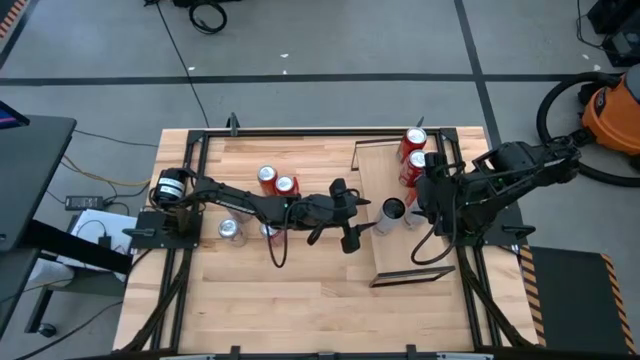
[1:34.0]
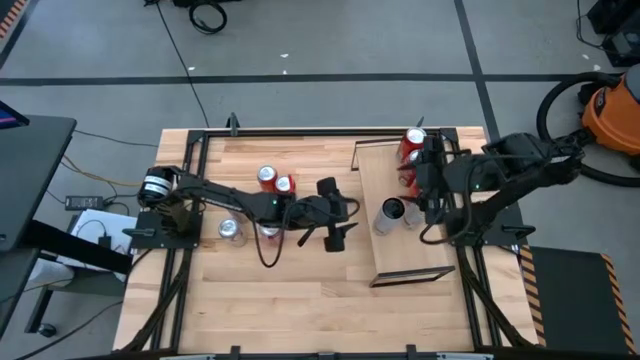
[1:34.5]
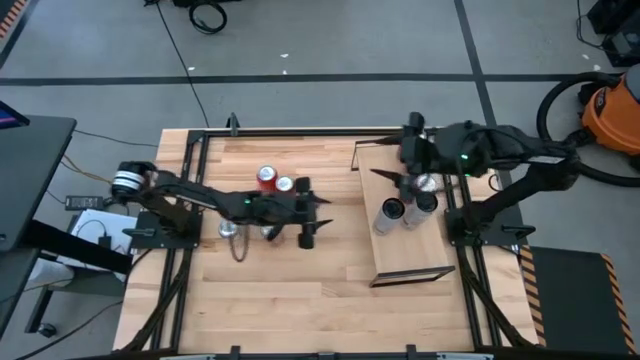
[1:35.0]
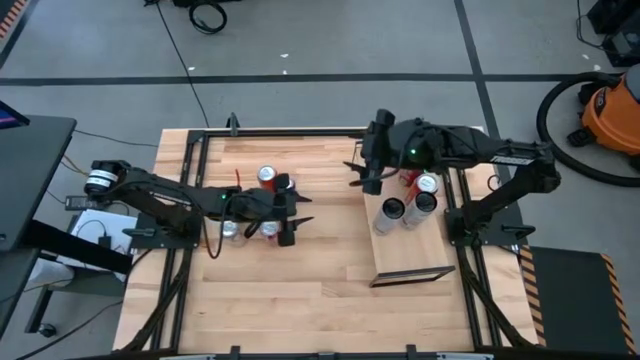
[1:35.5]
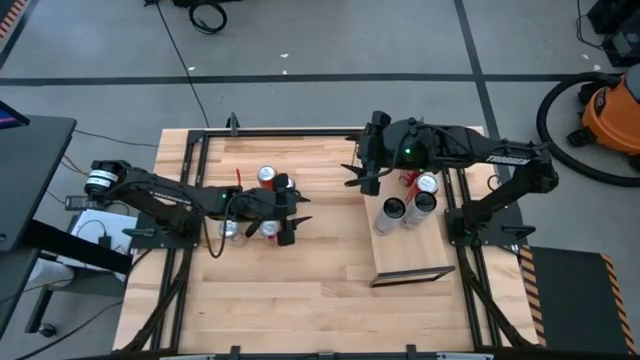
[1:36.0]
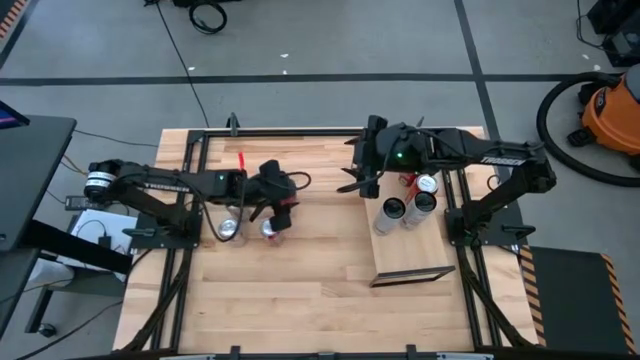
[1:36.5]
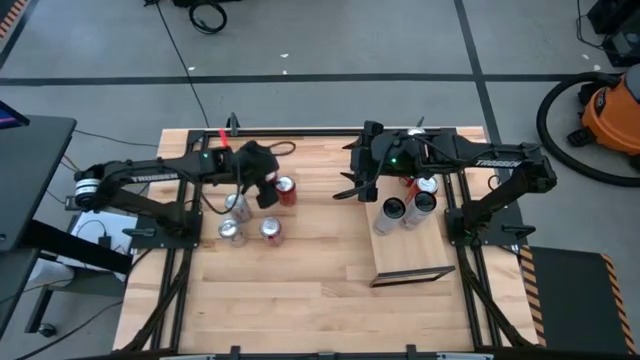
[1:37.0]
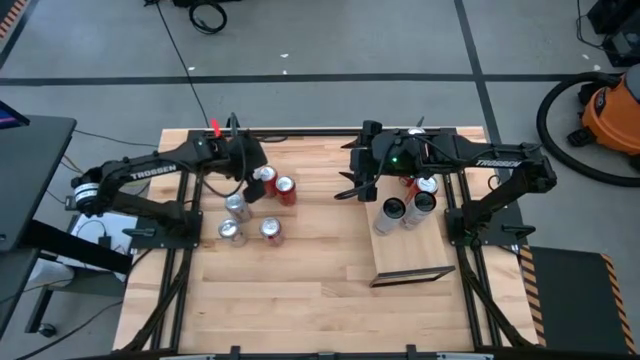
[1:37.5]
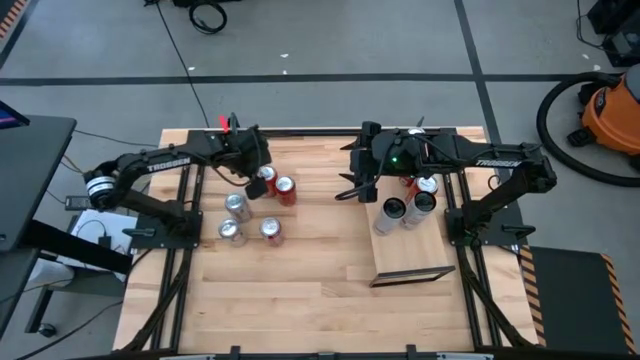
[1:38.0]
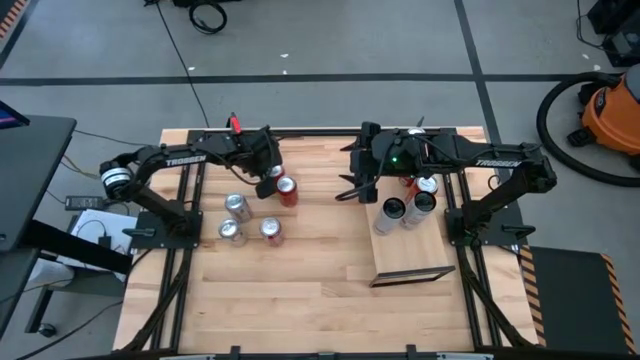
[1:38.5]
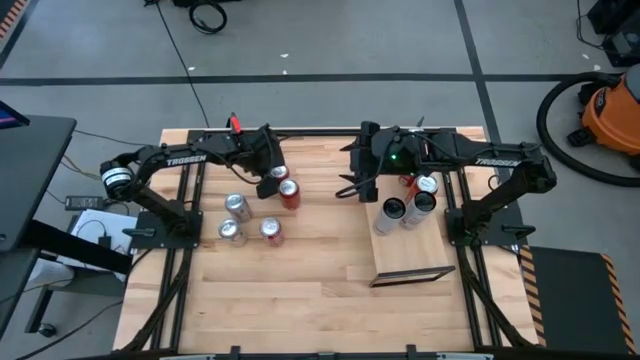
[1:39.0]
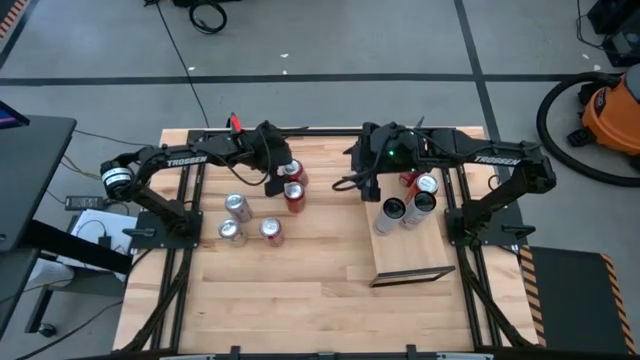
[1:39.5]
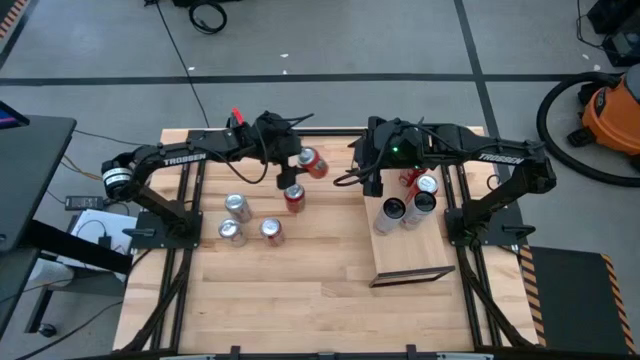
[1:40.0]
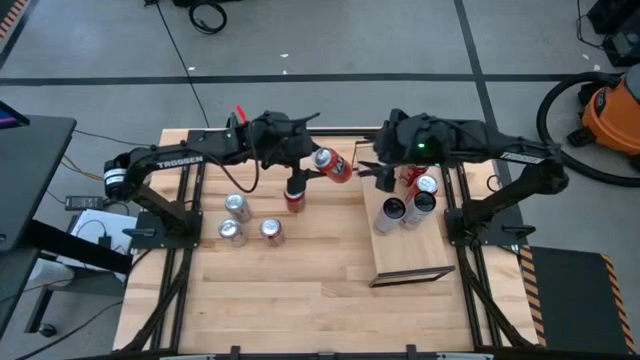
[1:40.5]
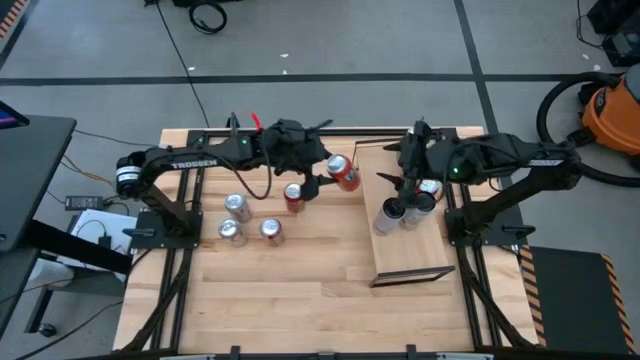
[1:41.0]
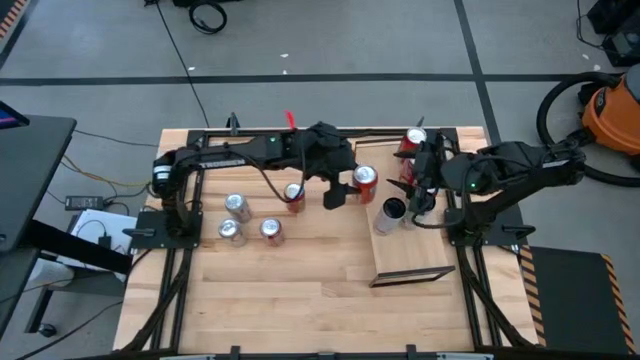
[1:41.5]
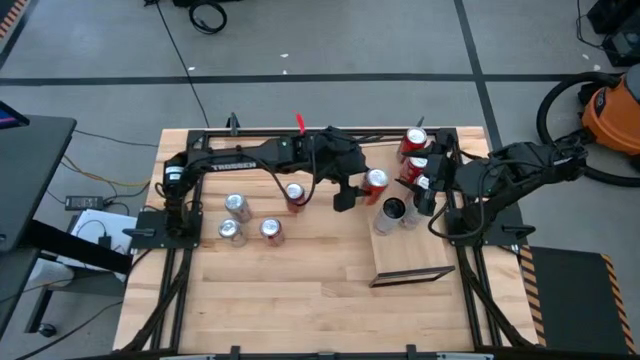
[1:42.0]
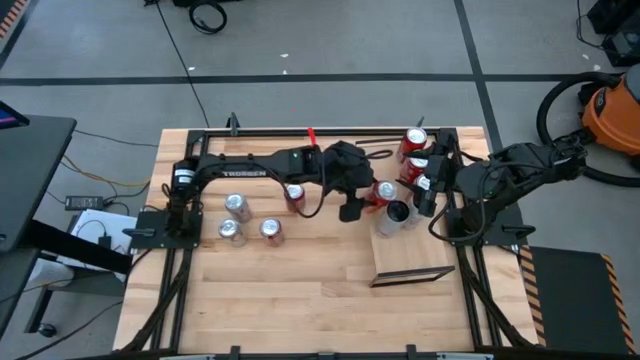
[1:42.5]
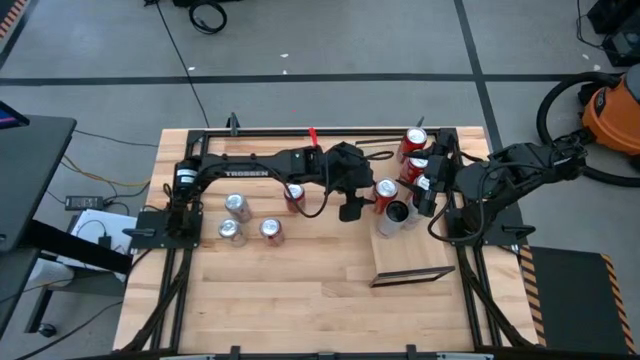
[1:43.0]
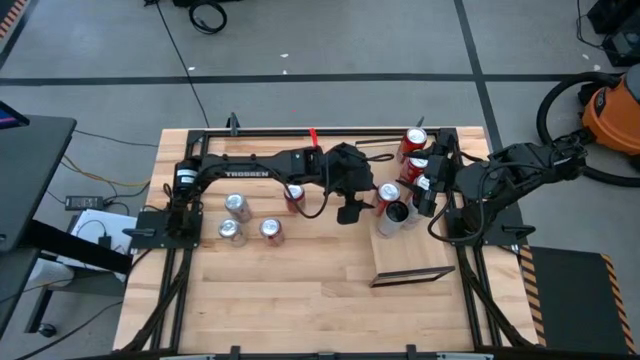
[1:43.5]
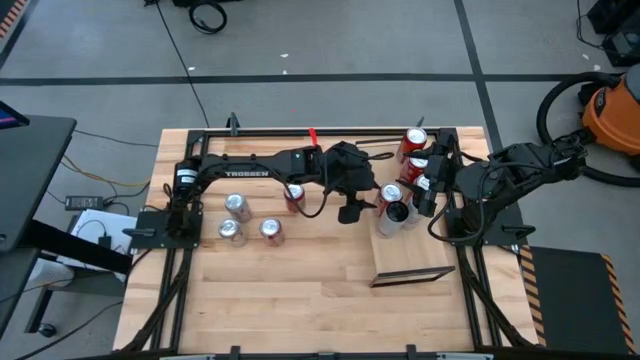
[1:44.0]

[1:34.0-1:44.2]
Task: Place canned beverage on shelf
Put the red soda can on the shelf aligned with the other red soda can

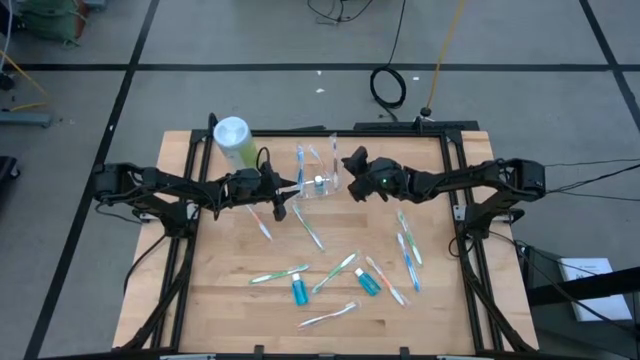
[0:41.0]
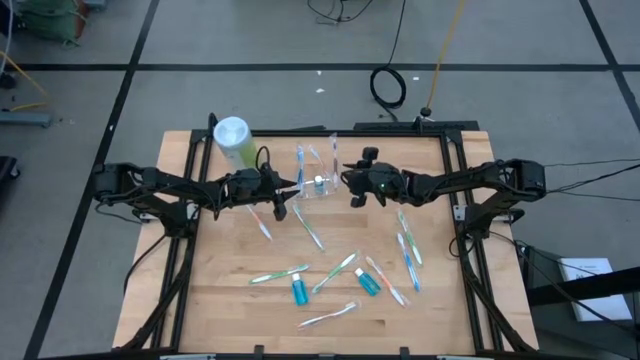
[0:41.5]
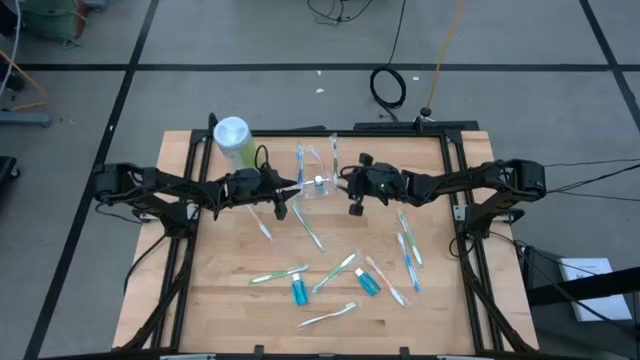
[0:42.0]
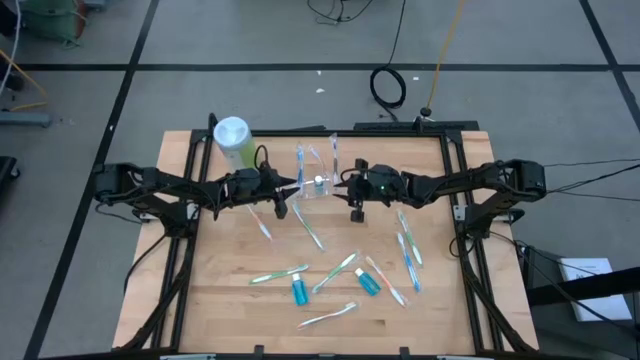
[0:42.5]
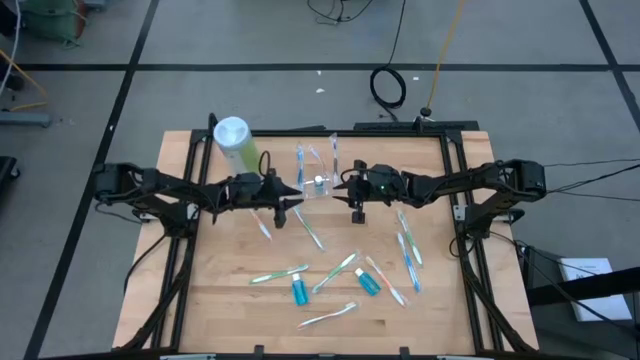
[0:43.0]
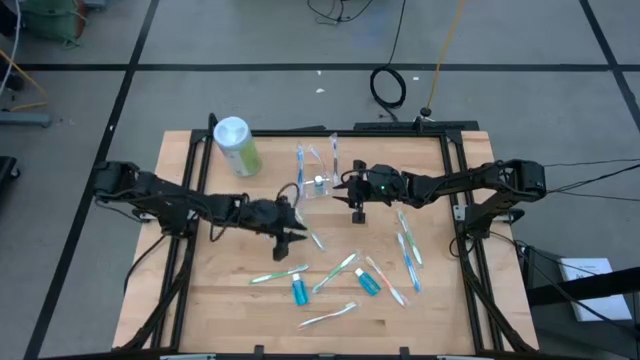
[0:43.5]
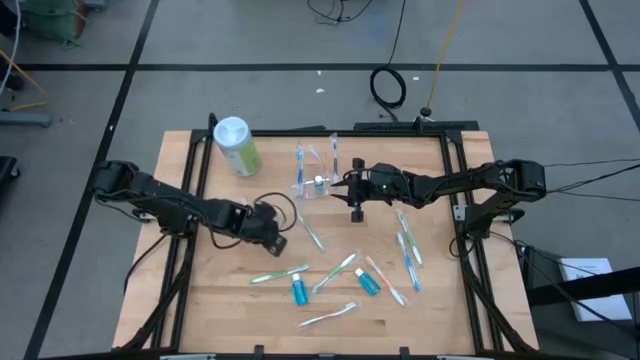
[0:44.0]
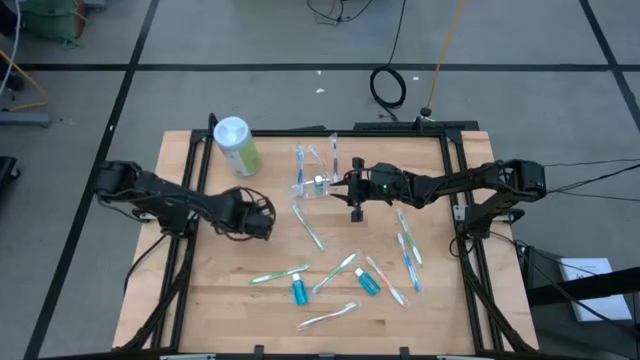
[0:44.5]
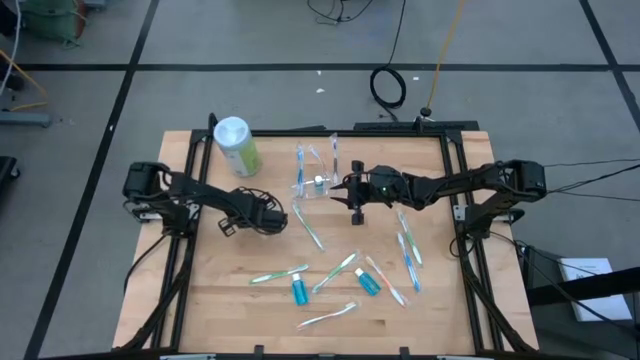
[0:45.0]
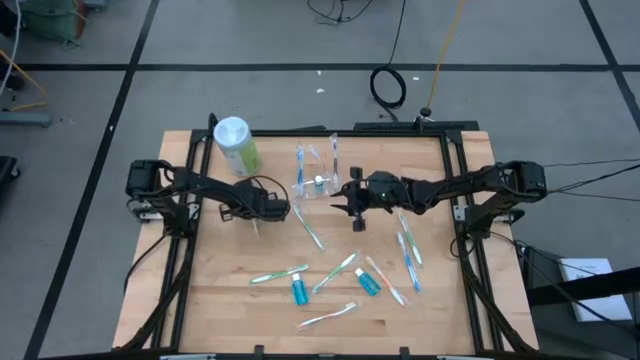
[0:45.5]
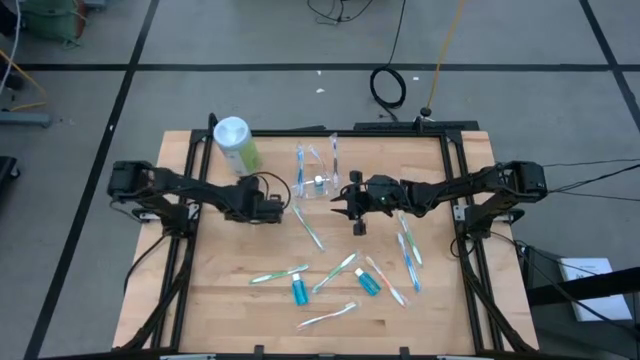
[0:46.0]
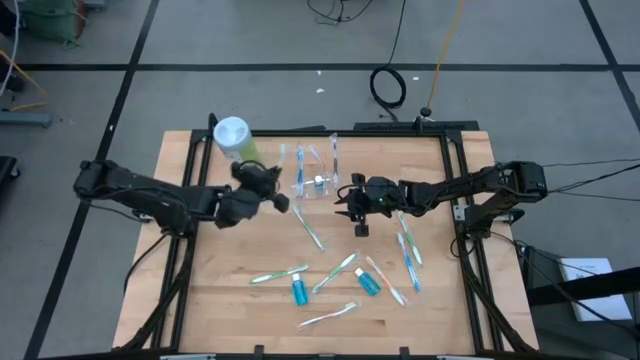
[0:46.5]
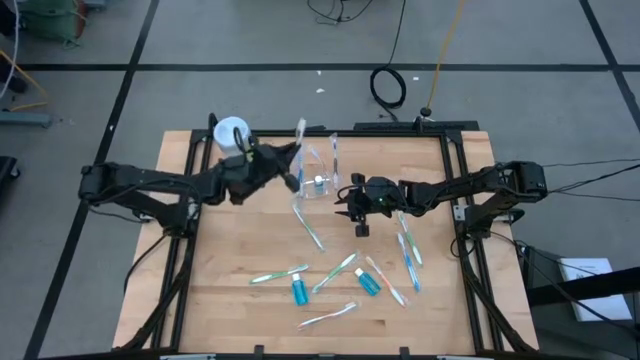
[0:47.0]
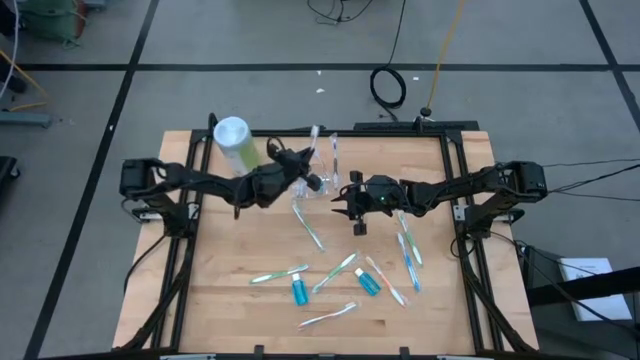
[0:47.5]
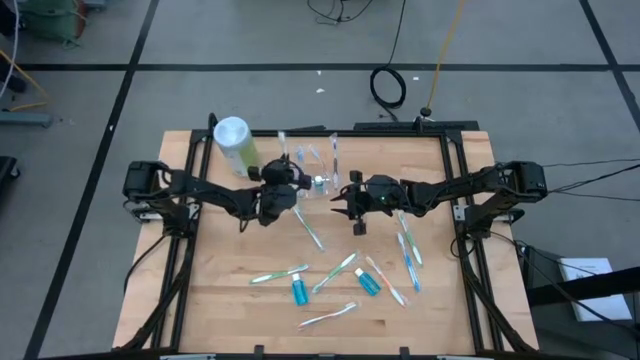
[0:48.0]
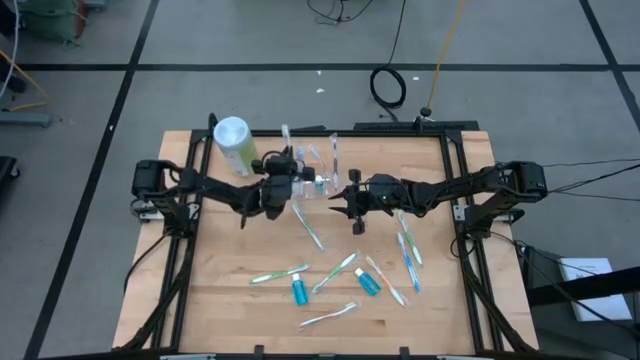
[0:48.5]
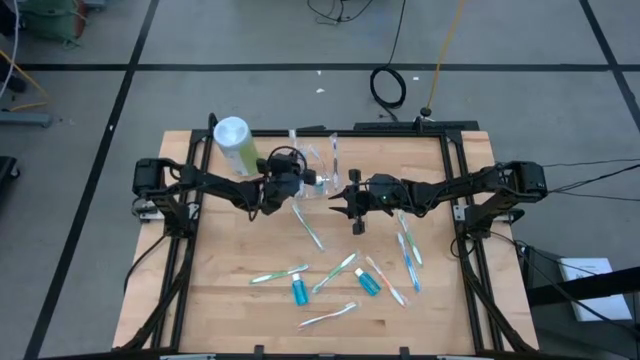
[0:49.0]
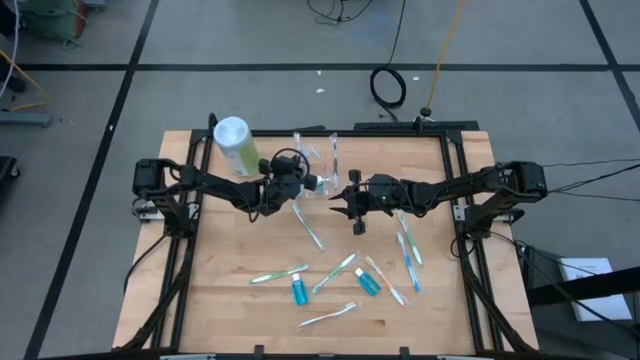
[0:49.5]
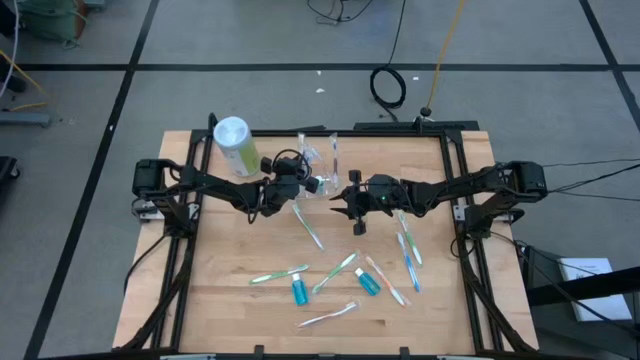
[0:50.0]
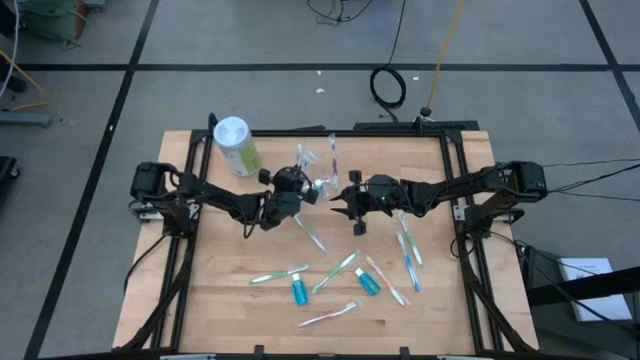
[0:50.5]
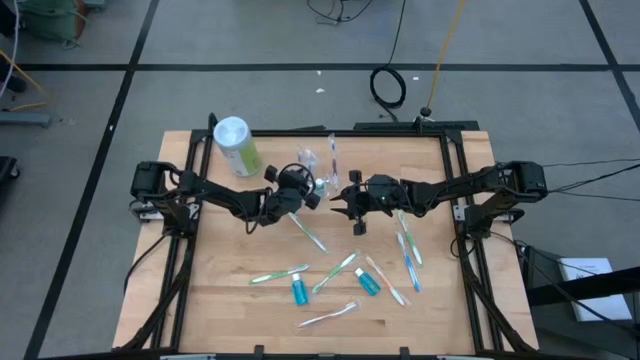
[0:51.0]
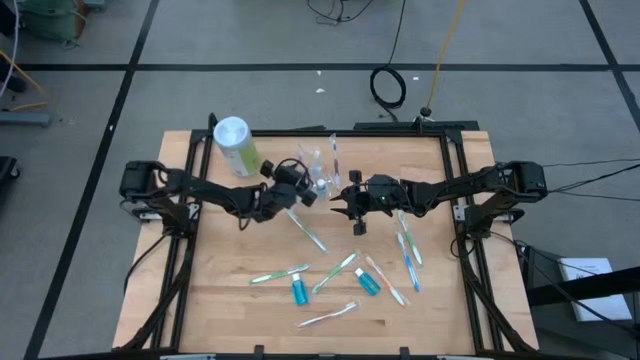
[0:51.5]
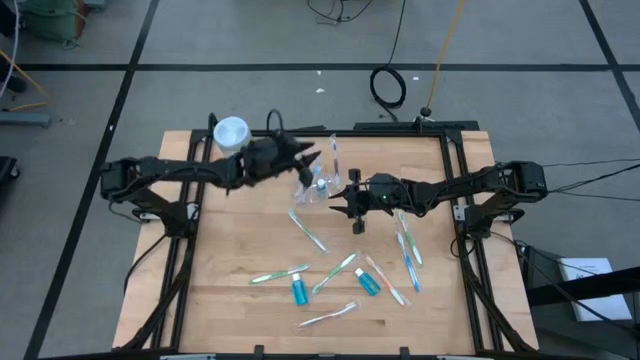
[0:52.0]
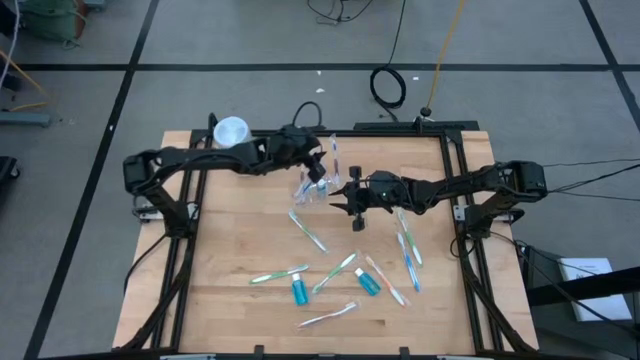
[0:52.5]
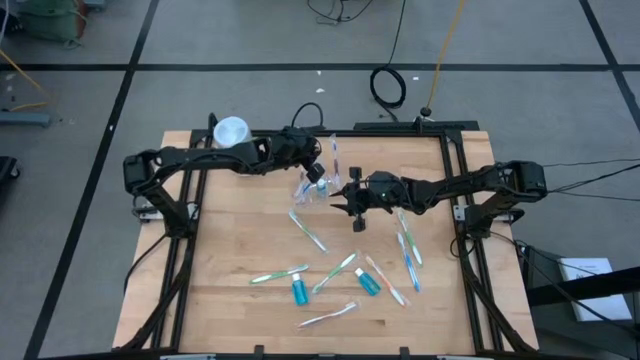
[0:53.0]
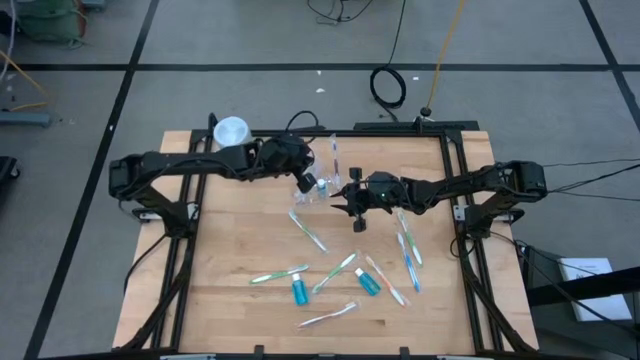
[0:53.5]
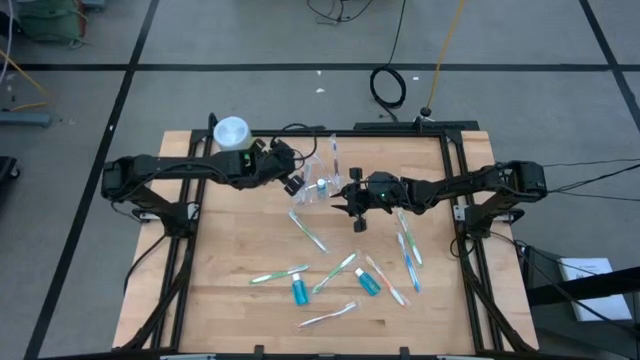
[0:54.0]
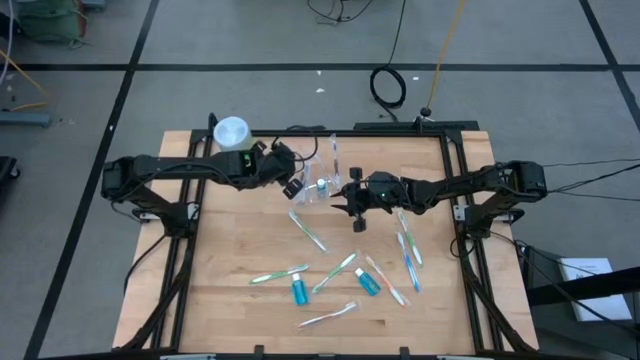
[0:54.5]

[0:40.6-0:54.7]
Task: Pick & Place toothbrushing station
Put the orange toothbrush into the transparent organizer
